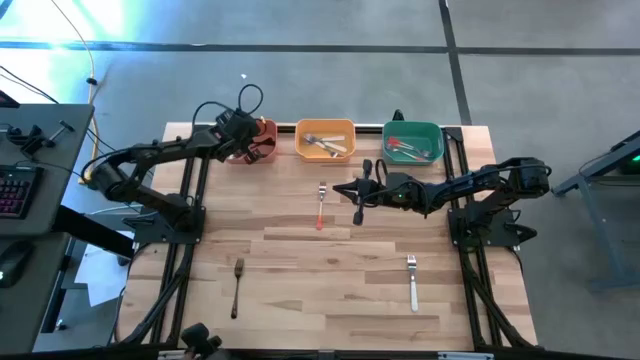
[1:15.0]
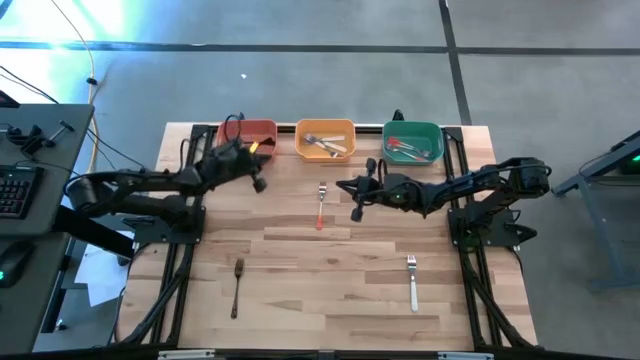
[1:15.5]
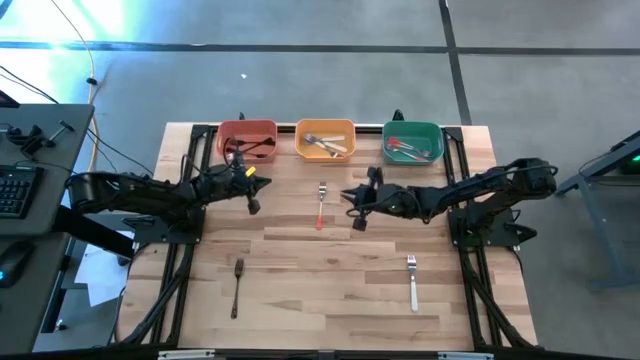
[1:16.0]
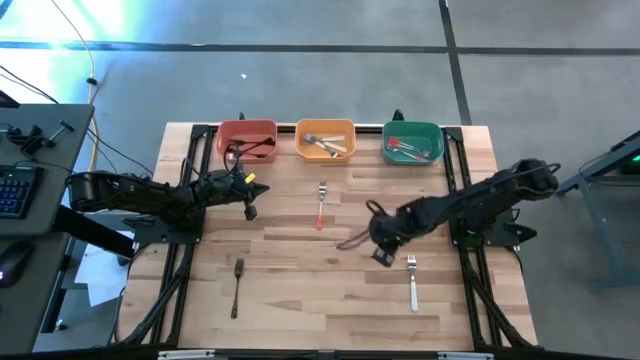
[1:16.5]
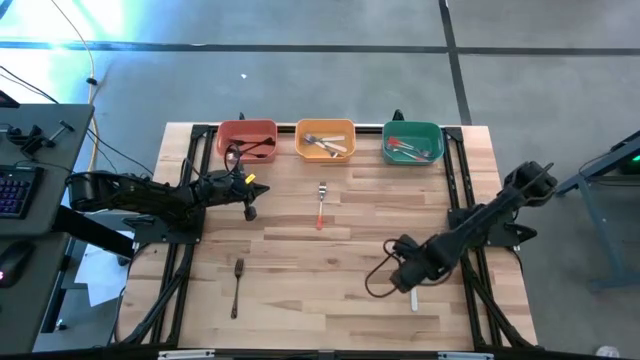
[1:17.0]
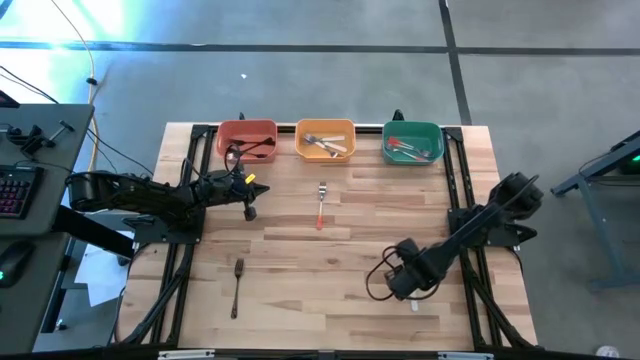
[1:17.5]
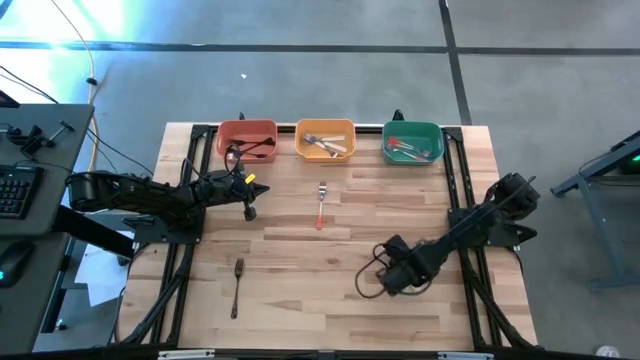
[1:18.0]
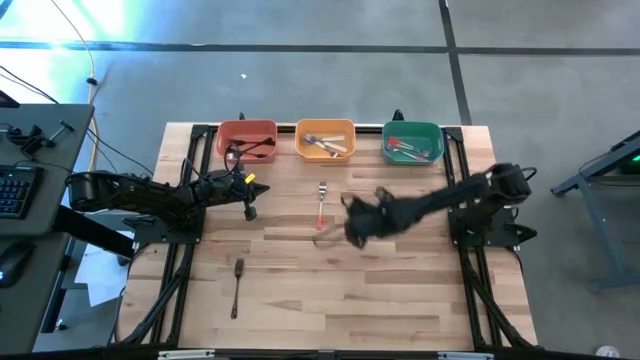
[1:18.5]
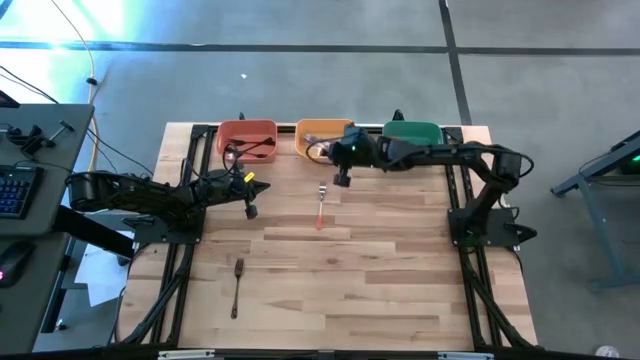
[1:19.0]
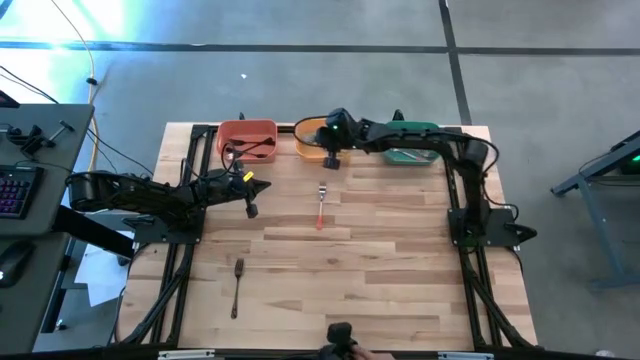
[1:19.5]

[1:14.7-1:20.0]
Task: Sort silverware by color (type)
Put the white fork into the yellow bin

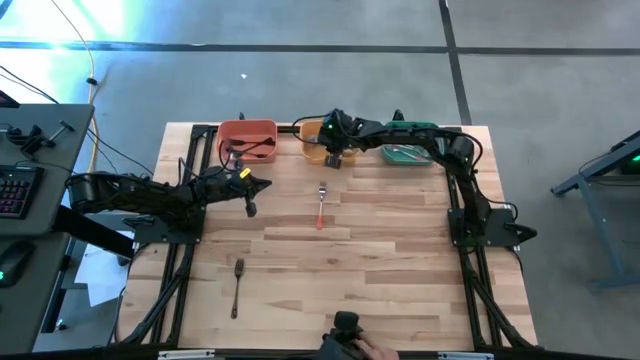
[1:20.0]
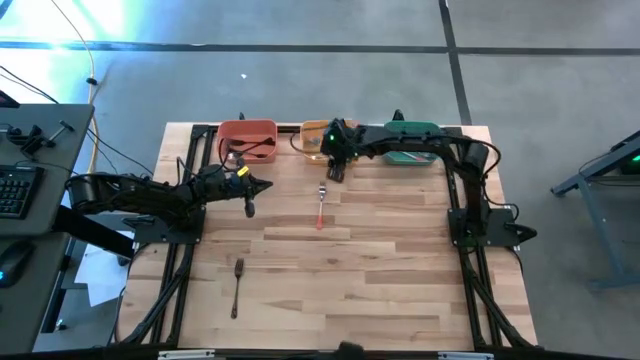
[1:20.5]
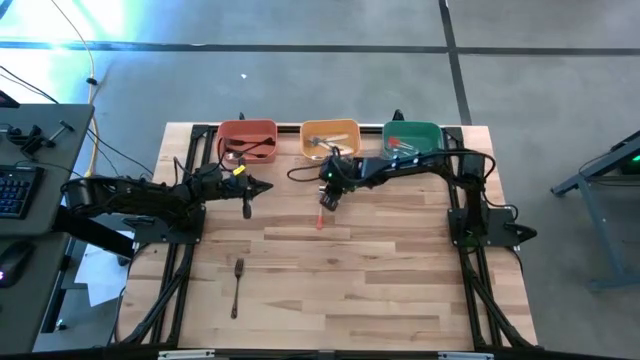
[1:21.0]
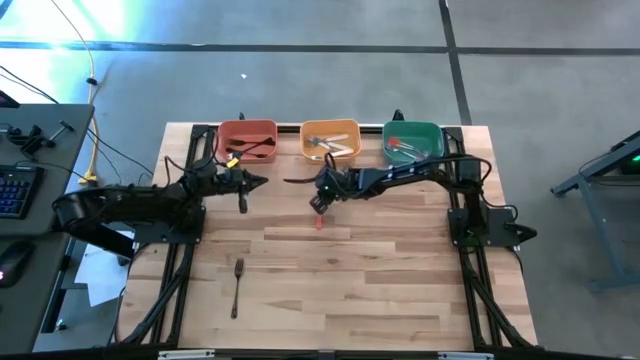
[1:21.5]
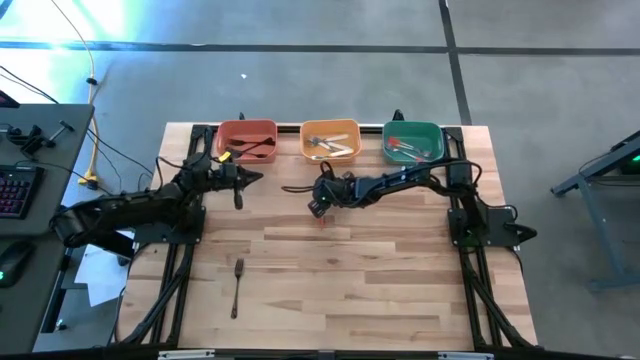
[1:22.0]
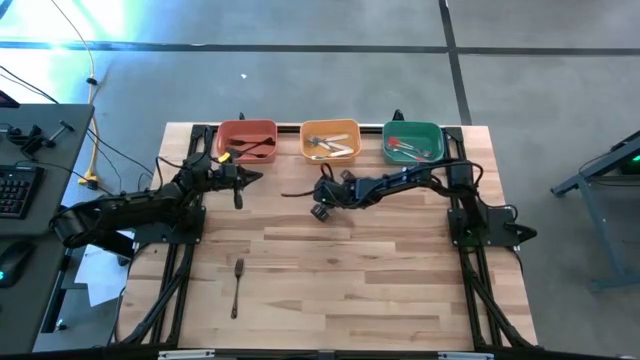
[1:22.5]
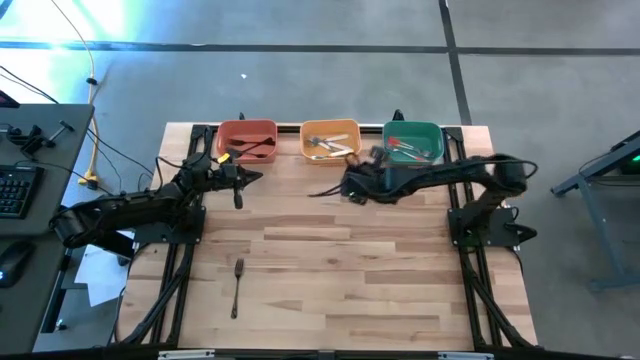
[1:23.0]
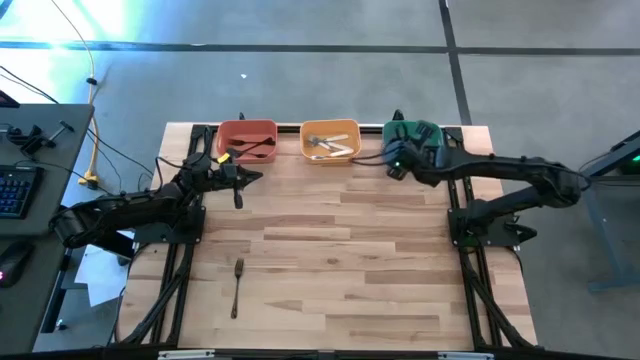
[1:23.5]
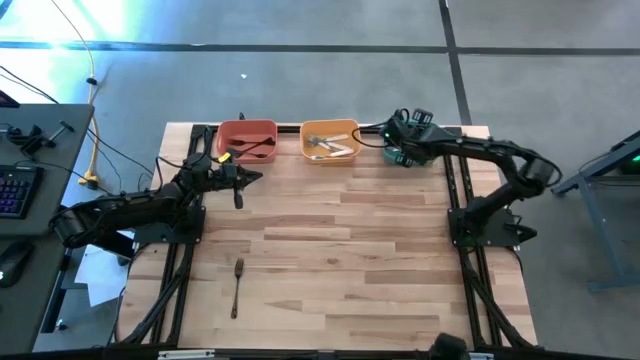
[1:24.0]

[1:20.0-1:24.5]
Put the orange fork into the green bin

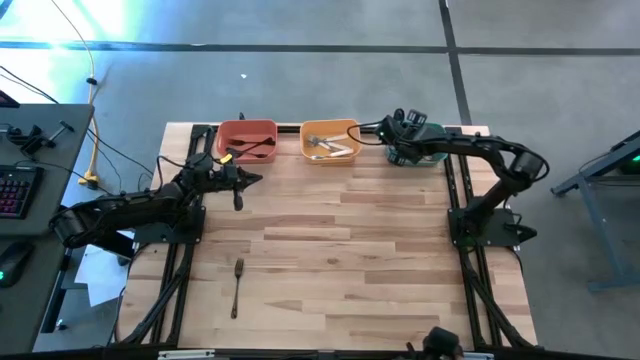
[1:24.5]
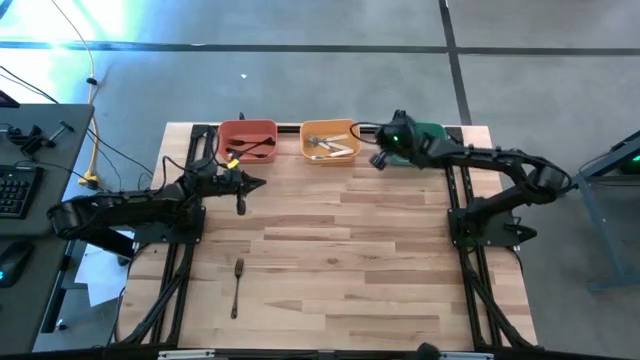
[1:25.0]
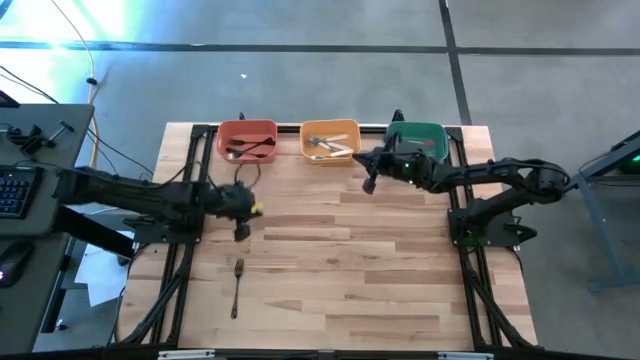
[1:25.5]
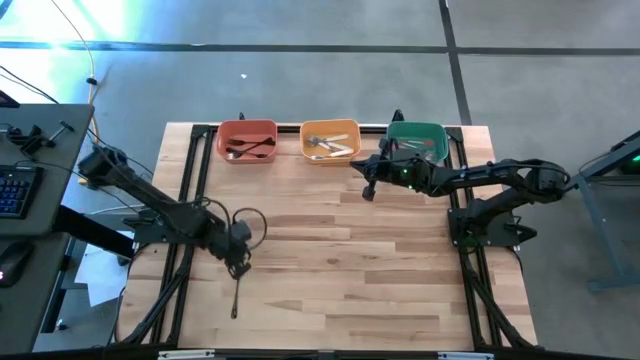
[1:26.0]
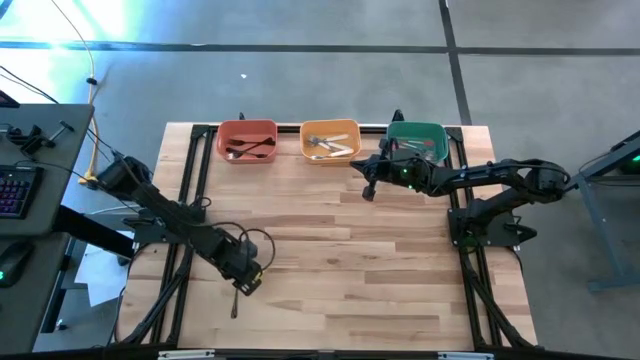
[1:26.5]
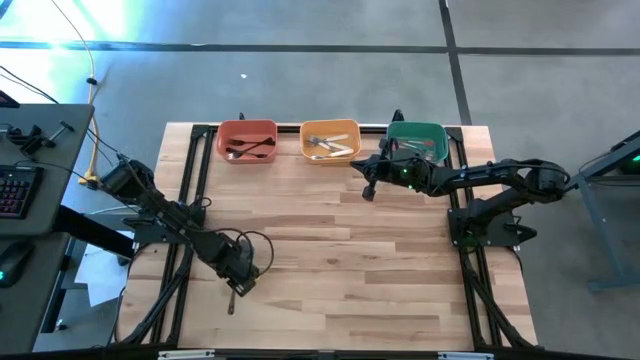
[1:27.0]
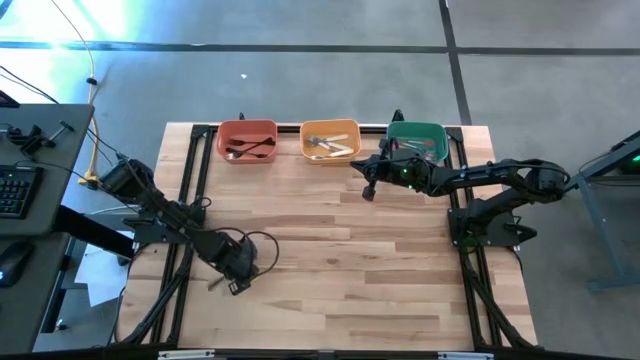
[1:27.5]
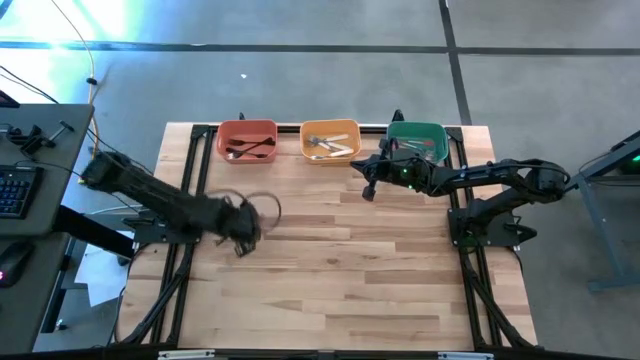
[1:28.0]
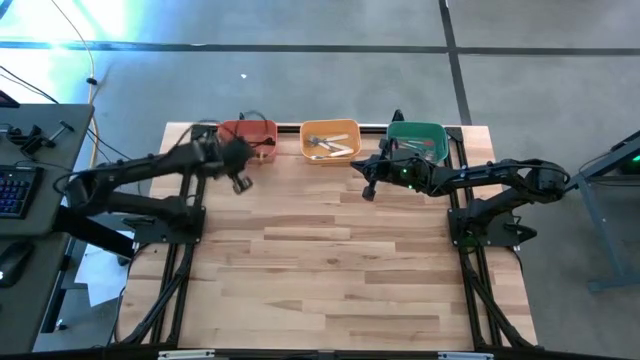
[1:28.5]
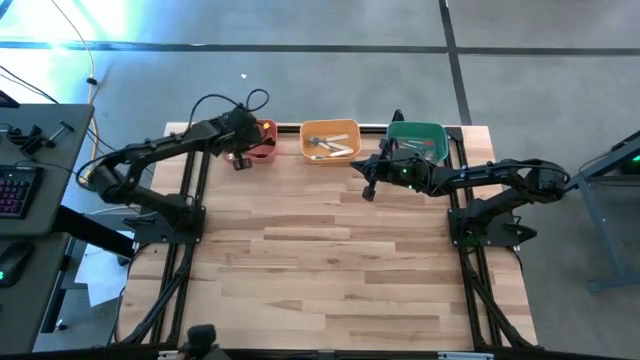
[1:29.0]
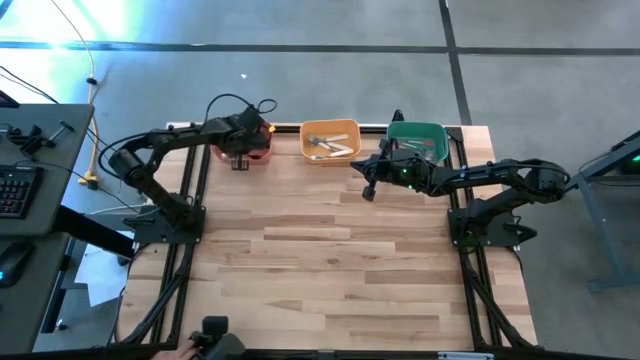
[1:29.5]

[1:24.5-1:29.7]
Put the black fork into the orange bin

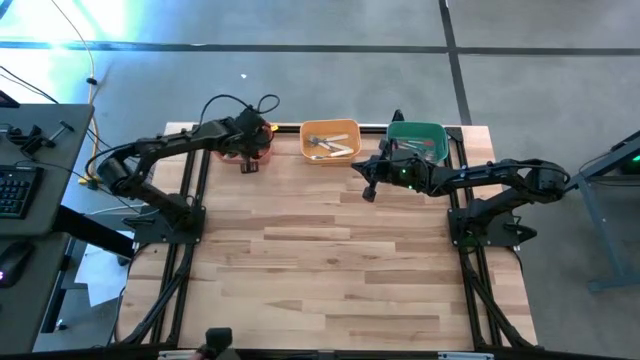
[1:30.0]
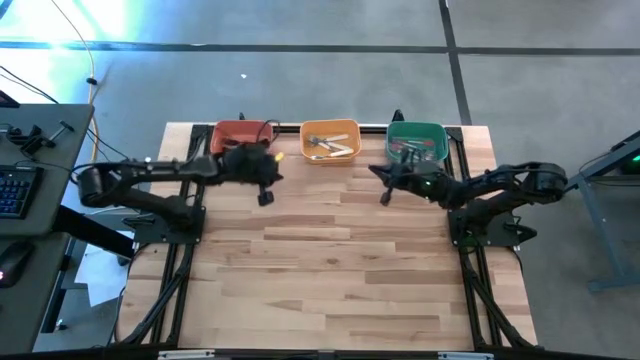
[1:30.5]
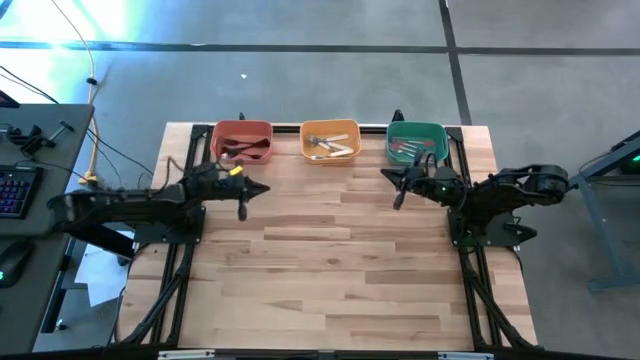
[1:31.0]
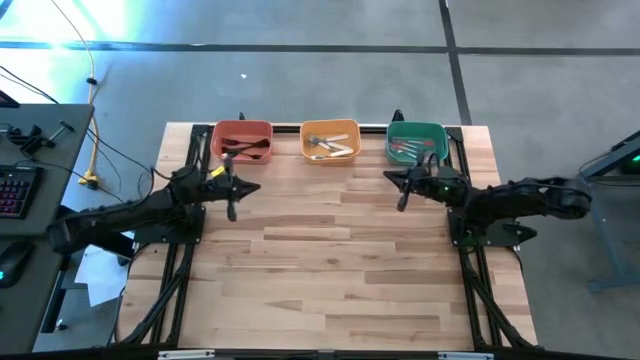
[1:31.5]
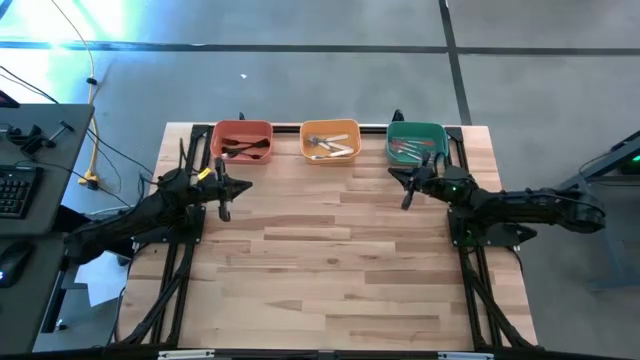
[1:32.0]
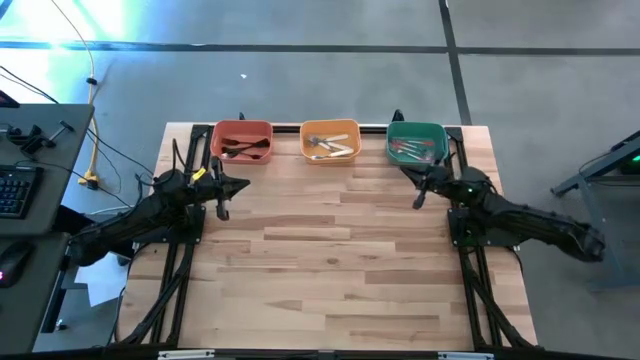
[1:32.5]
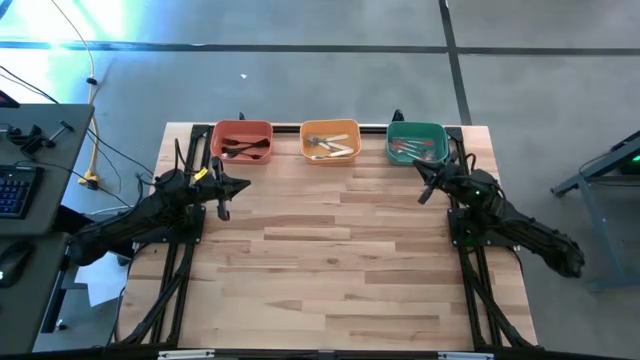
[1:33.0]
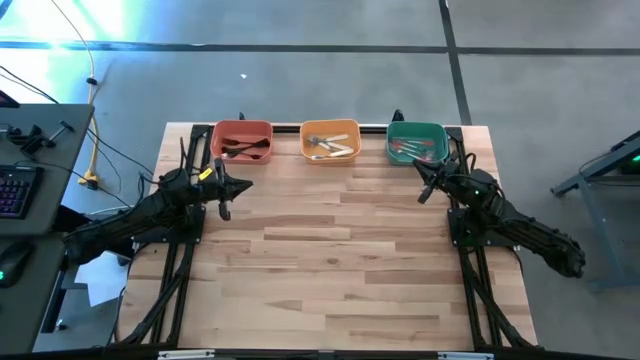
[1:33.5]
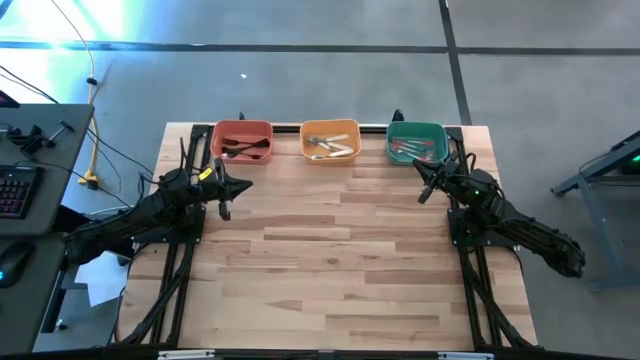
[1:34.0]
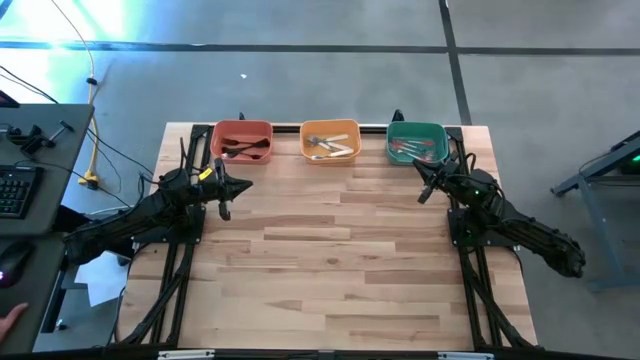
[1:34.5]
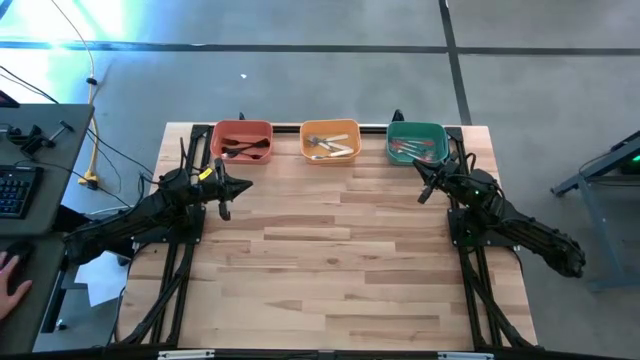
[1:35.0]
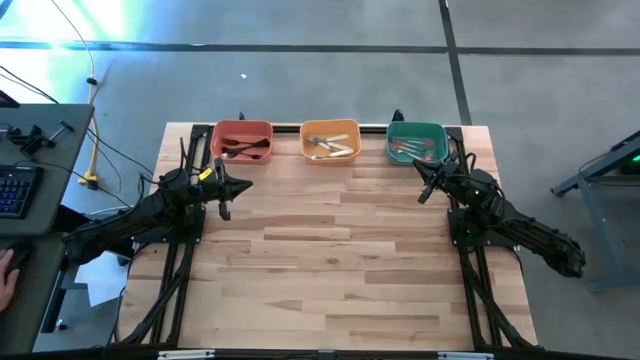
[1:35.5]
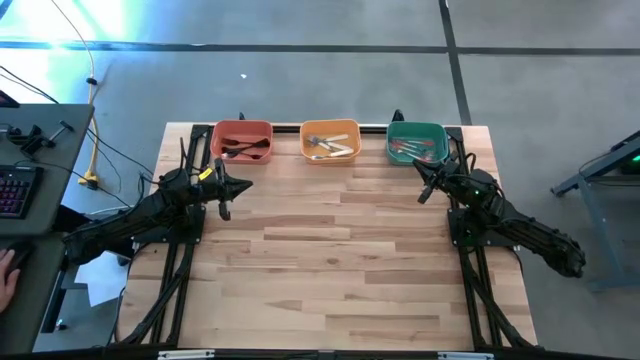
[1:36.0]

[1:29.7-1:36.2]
Return to Home Position

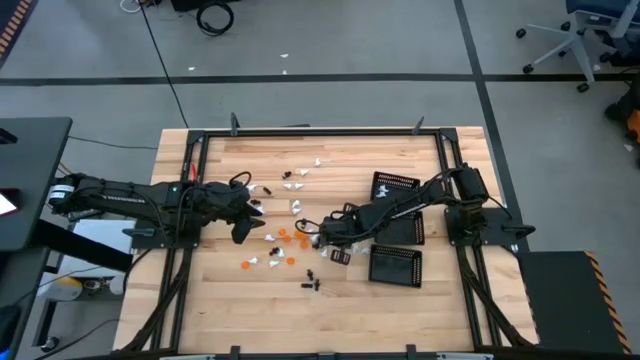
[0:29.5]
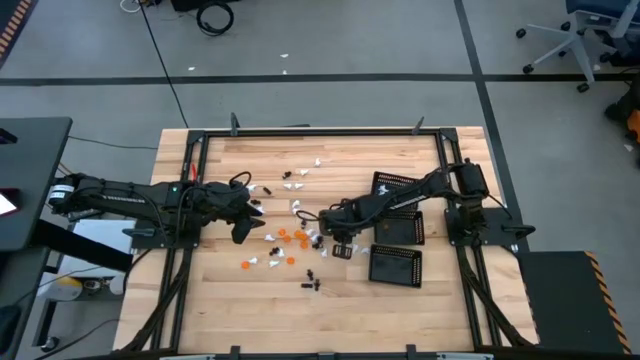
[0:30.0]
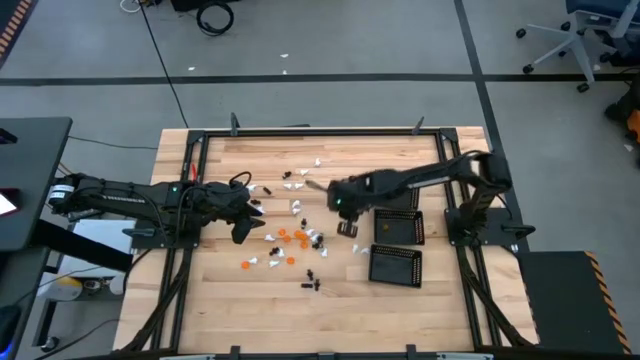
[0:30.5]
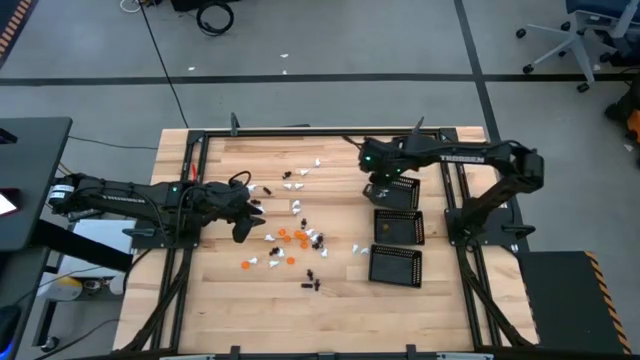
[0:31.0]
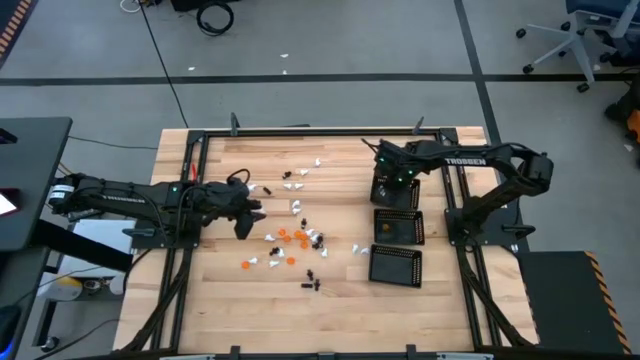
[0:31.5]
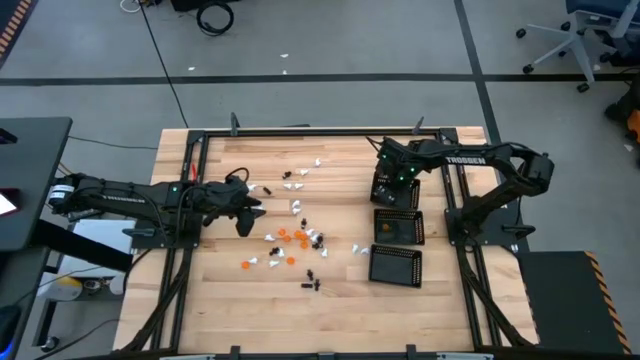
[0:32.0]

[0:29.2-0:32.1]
Task: Sort Halloween decoration
Put the white ghost toy into the top black bin
